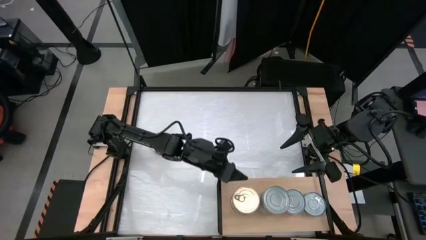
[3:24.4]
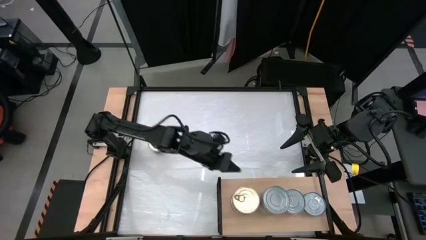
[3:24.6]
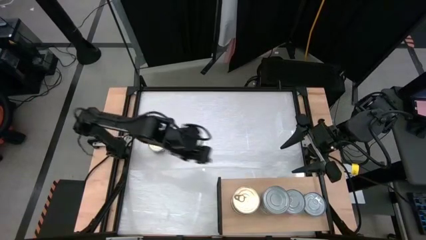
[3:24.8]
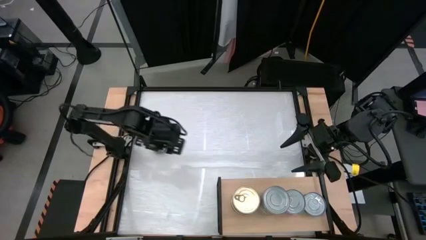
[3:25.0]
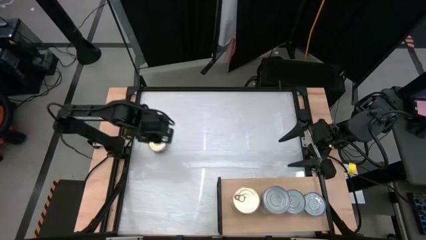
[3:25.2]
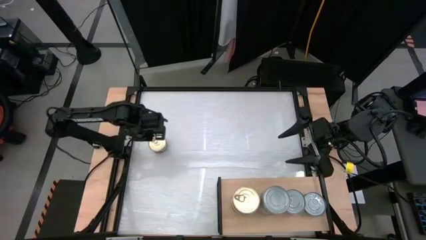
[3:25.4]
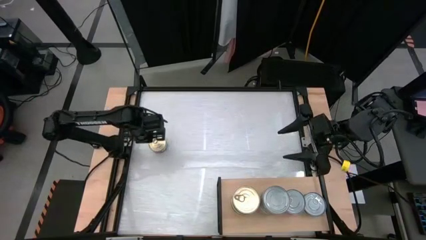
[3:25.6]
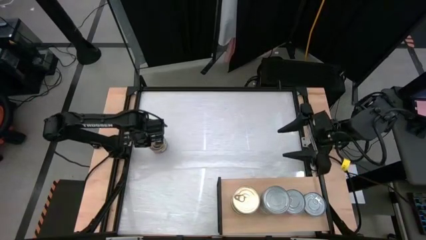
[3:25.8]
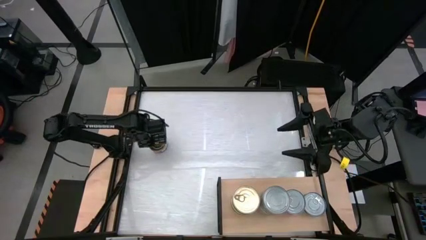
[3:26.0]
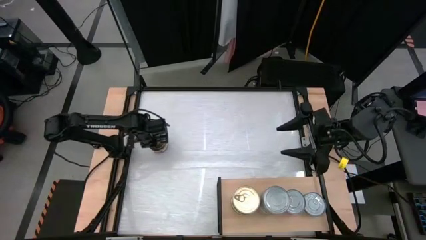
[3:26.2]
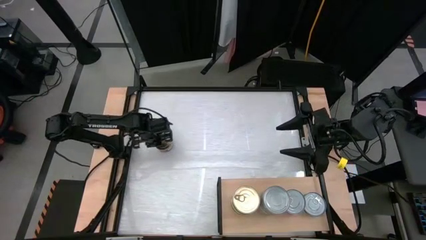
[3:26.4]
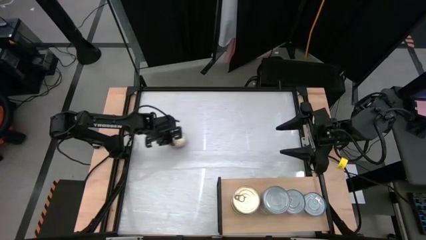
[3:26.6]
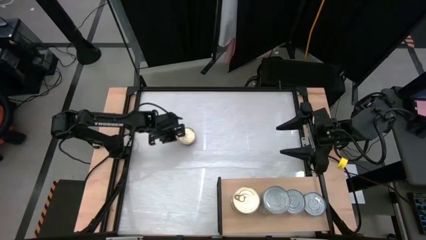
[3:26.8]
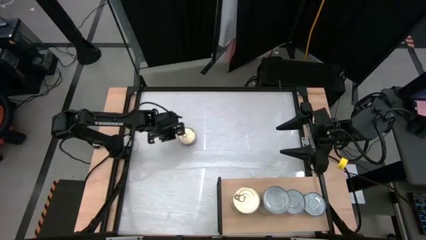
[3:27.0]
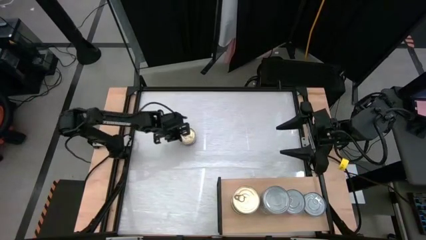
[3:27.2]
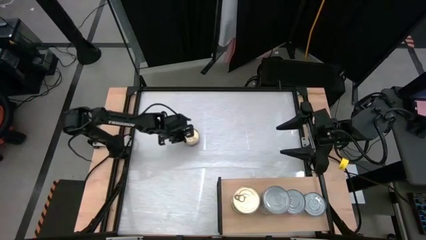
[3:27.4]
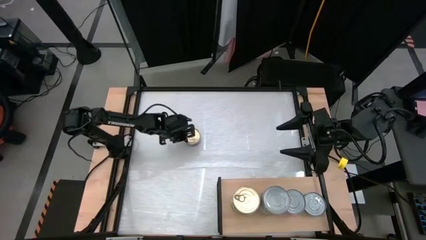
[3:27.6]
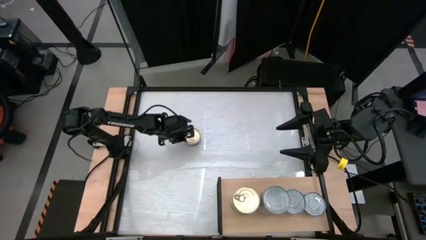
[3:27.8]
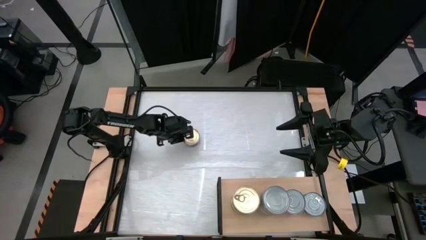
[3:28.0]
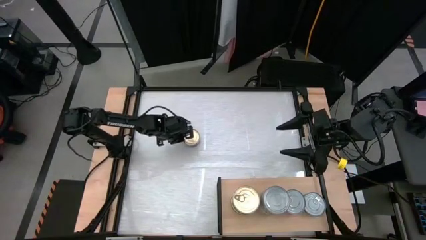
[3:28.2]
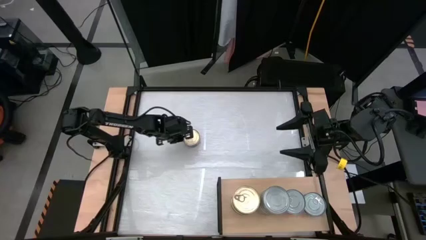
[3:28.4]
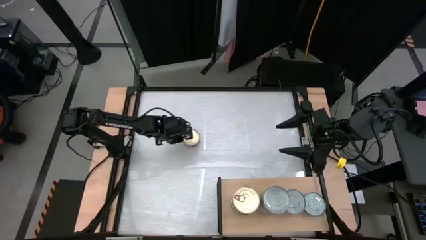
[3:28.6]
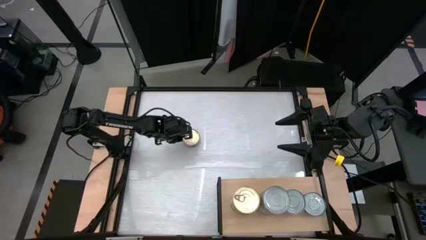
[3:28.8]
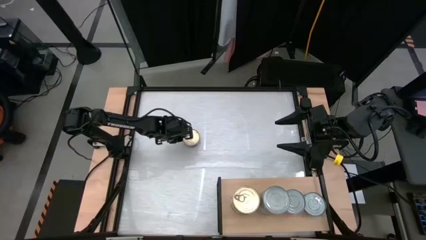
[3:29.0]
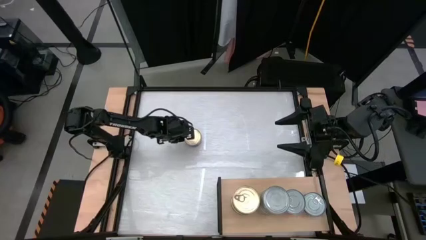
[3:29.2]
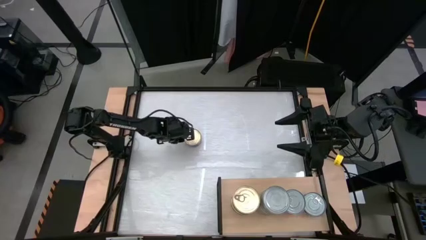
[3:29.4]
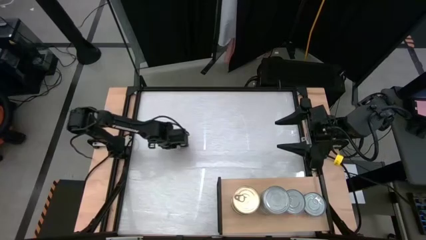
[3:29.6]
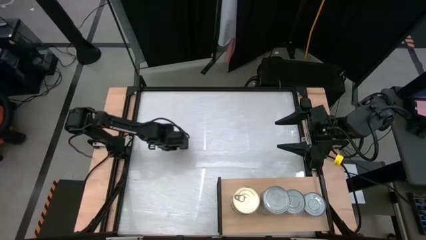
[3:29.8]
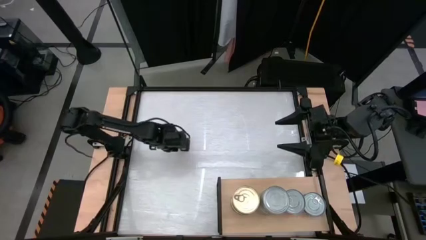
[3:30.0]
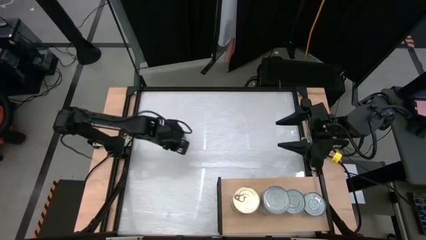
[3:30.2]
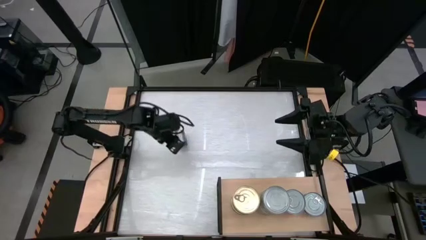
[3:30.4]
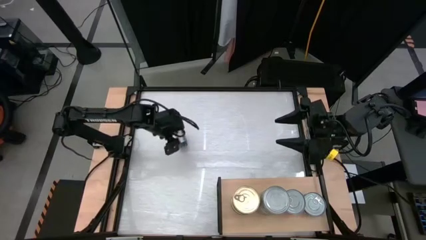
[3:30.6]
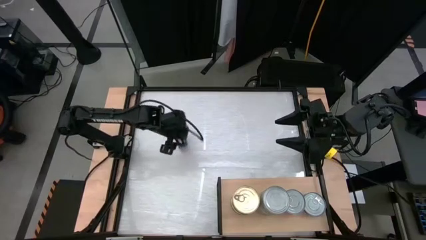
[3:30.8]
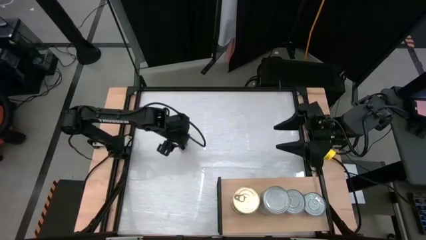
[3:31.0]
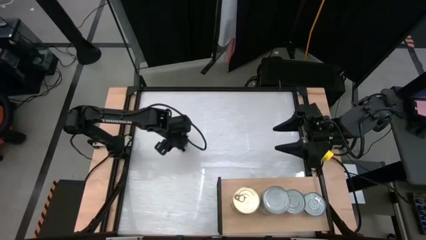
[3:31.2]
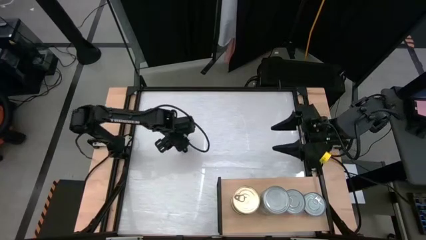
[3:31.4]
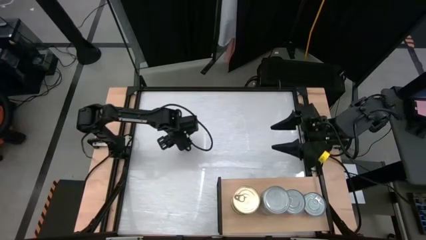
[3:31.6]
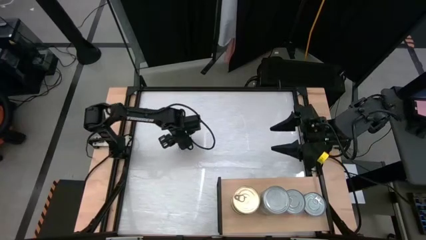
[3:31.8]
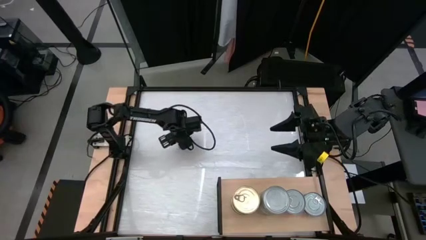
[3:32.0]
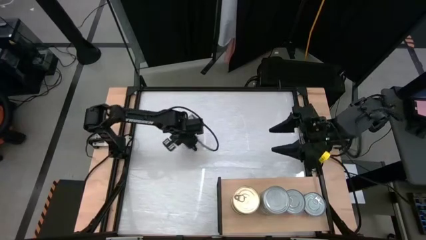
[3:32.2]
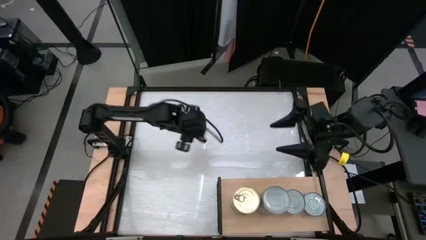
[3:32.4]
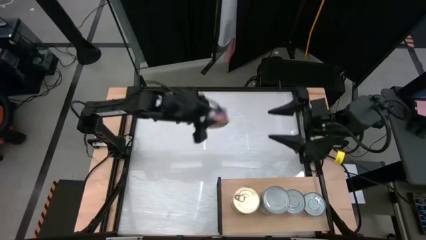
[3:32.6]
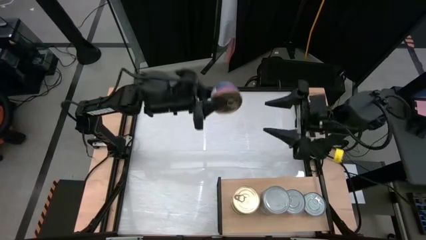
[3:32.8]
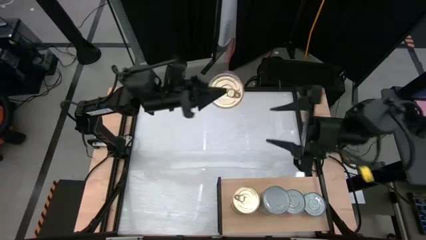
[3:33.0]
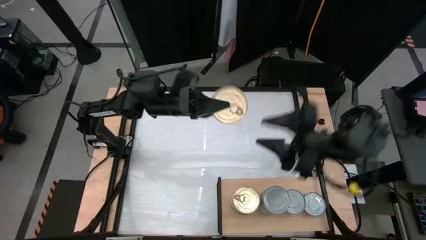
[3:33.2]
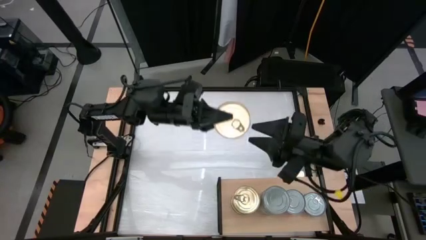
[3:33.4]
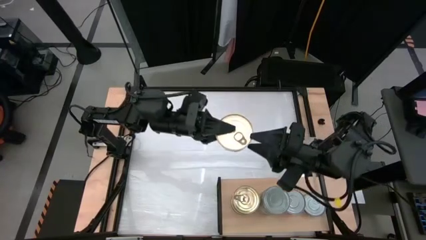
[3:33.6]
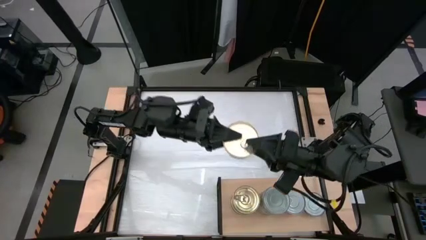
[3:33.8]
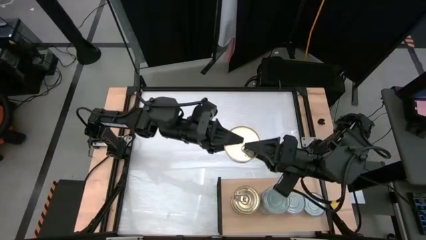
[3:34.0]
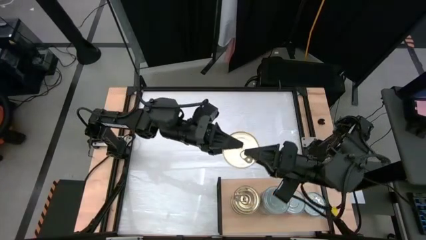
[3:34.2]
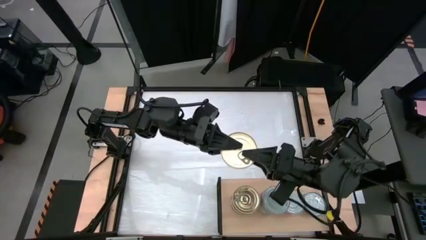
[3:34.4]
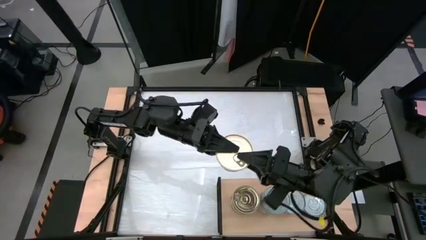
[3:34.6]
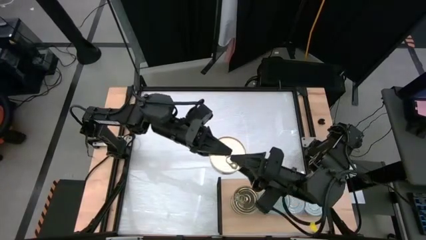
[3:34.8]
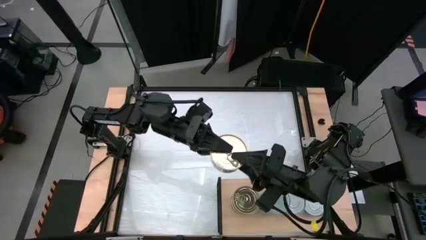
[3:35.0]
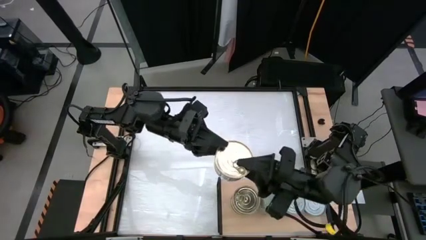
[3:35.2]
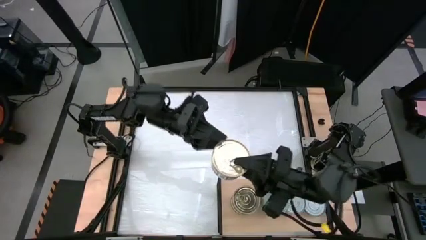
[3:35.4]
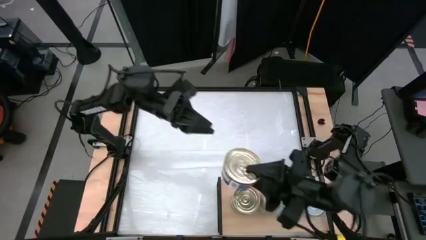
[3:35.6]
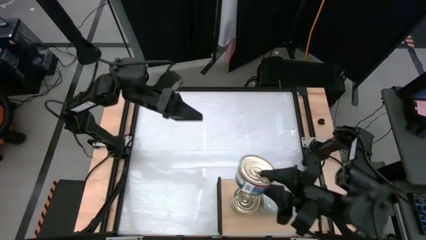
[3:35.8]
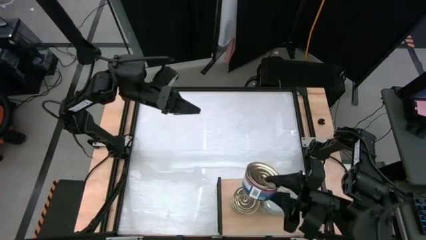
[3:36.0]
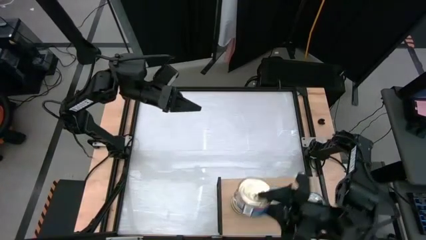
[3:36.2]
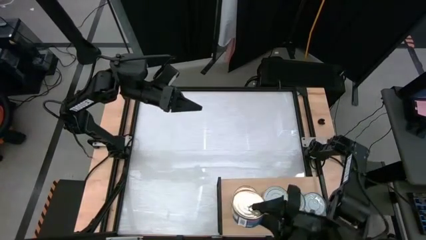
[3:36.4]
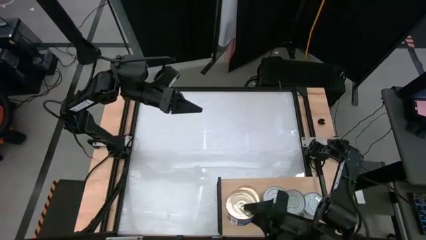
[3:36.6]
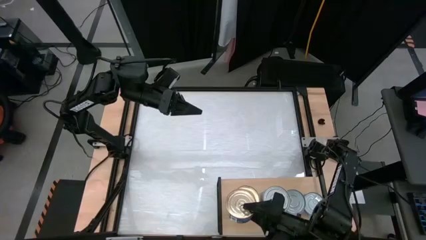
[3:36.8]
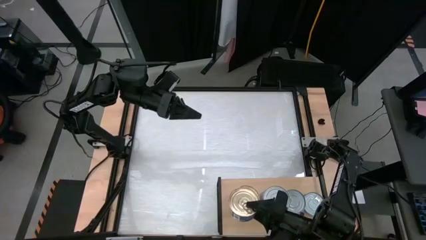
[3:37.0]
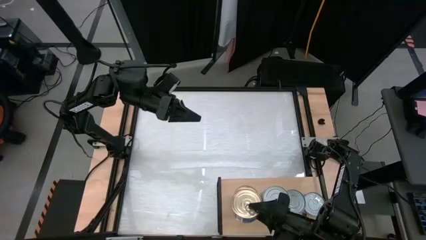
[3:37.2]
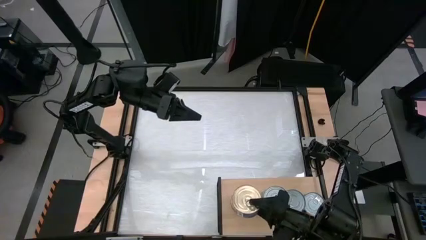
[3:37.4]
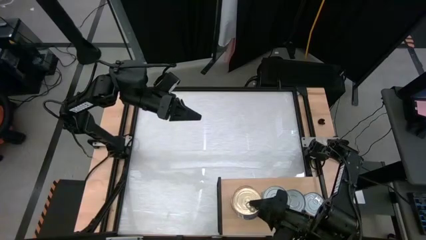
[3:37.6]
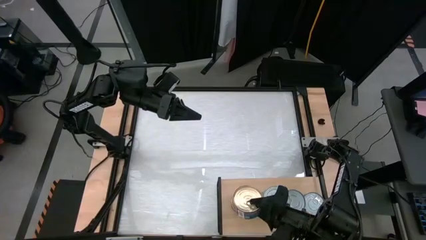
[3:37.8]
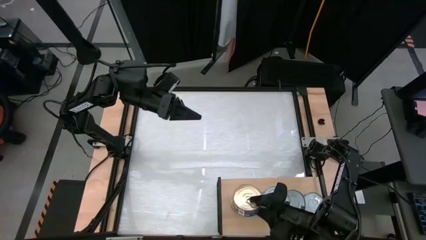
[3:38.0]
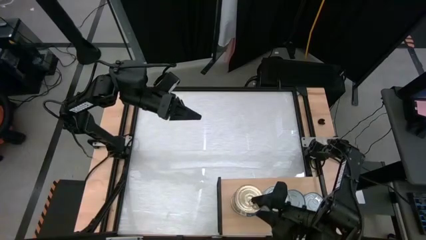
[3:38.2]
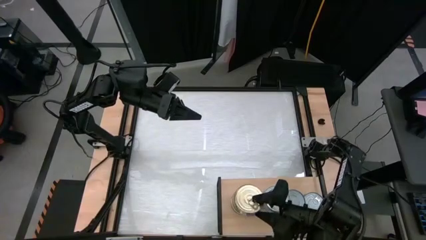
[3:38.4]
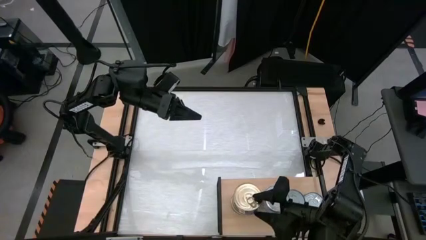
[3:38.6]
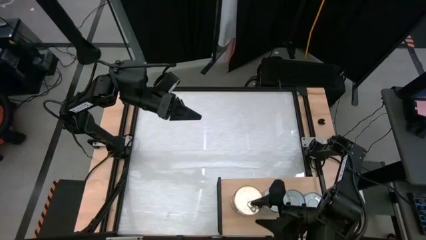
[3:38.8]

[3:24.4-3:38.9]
Task: Stack canned seafood by type on shelf
Stack the blue-pink tuna can on top of the other blue-pink tuna can on the shelf

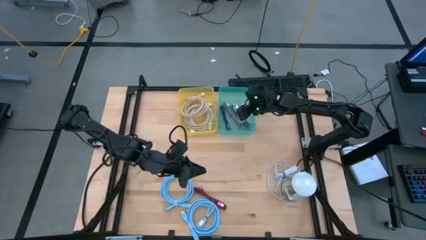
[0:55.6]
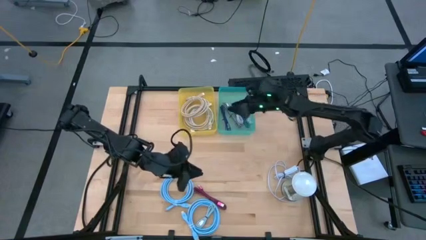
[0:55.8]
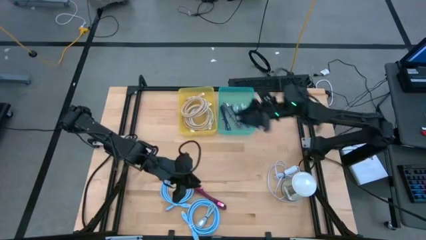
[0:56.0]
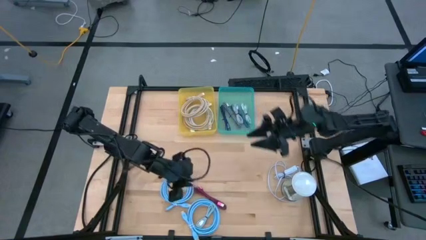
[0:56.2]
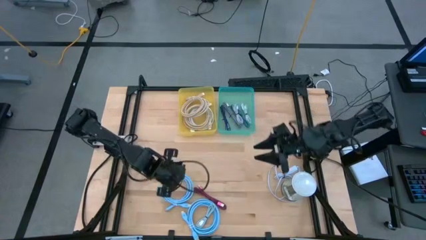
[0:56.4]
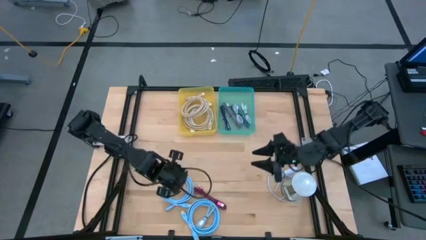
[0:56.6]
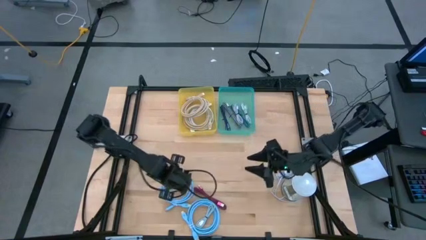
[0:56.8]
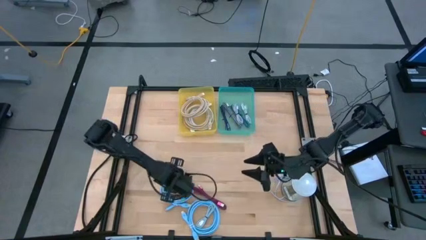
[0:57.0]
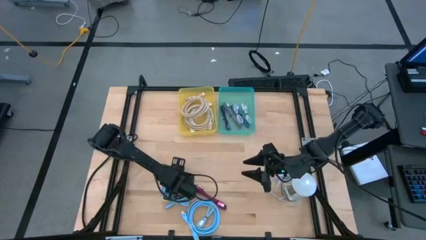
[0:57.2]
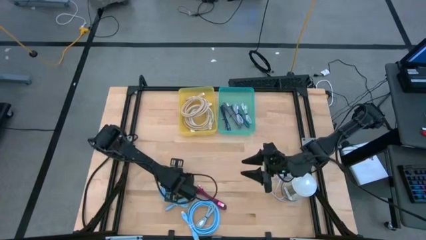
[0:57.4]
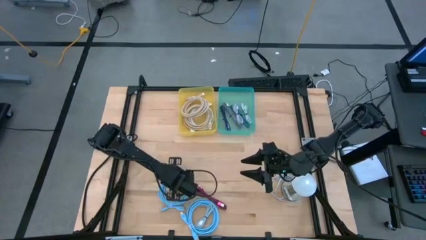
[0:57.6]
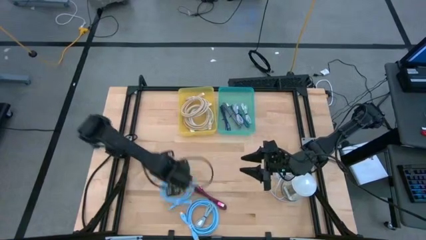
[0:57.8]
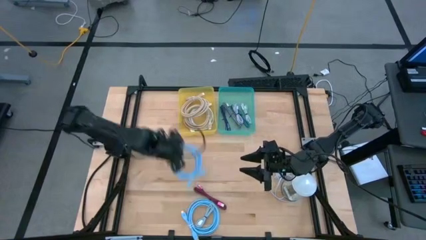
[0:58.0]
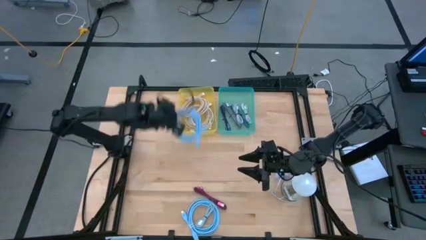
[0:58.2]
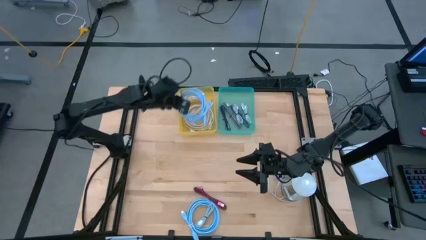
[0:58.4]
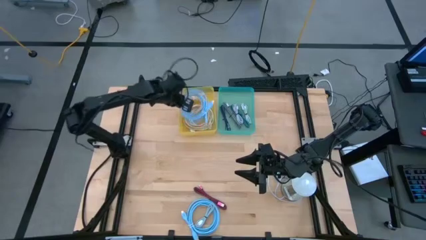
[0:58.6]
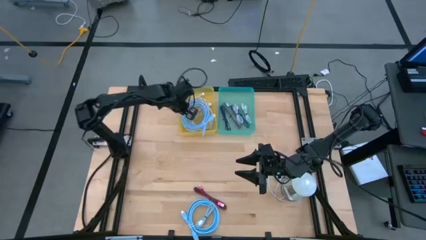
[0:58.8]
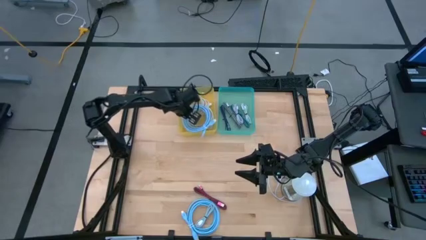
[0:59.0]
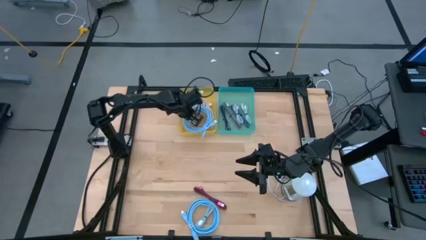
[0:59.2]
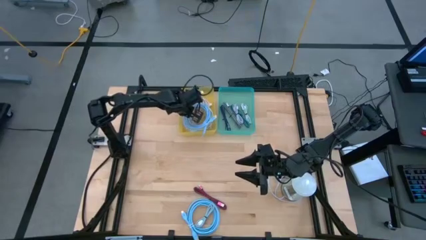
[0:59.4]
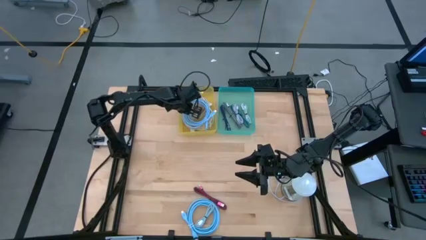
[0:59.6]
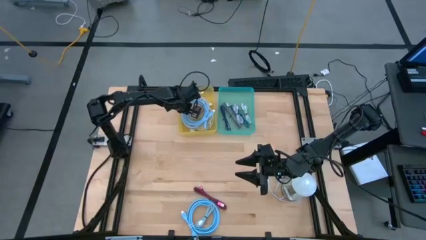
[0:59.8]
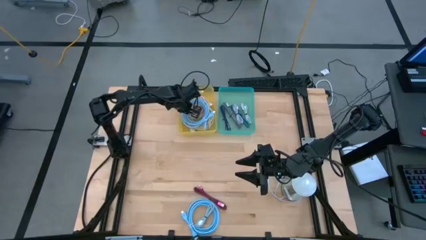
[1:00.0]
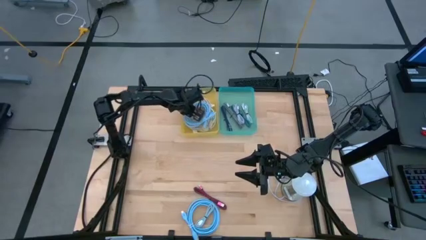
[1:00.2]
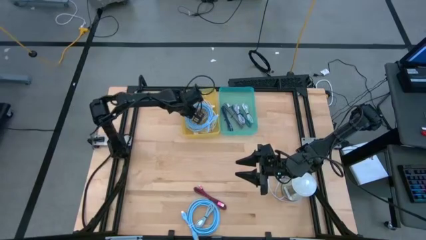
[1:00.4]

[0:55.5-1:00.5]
Task: Pick and place USB-C Cables
Put the top large blue charger cable into the yellow bin
